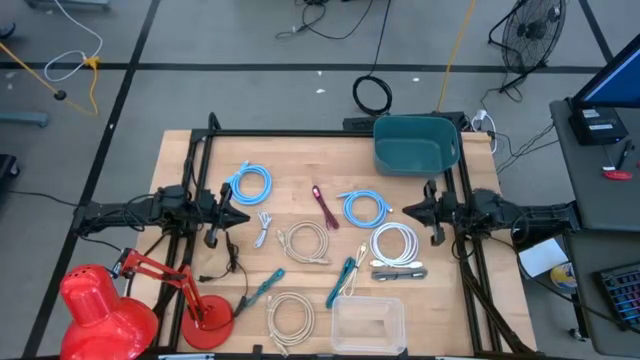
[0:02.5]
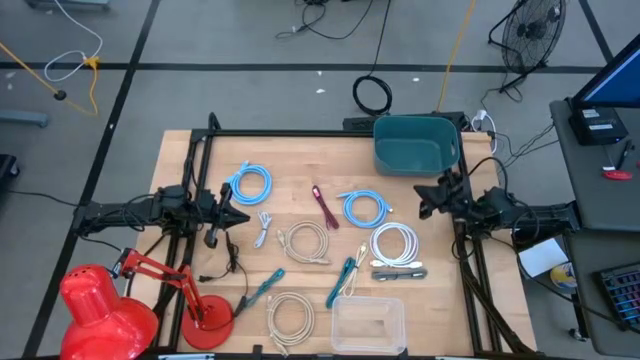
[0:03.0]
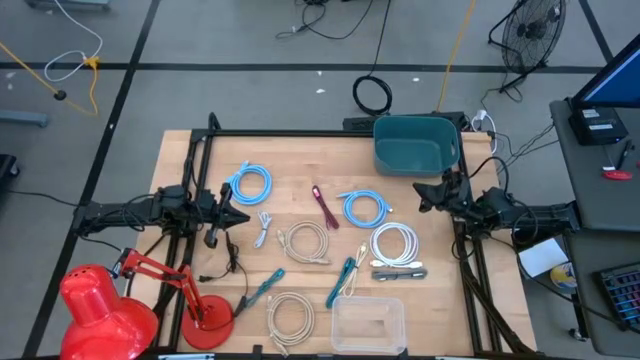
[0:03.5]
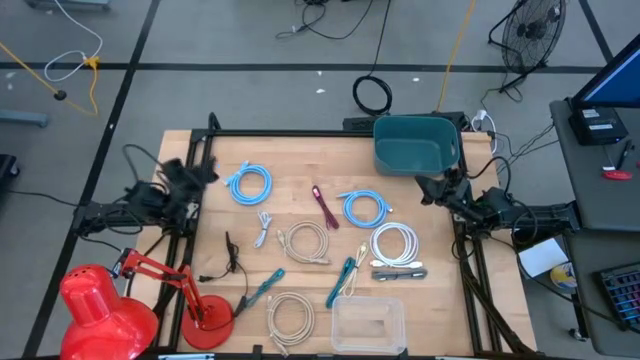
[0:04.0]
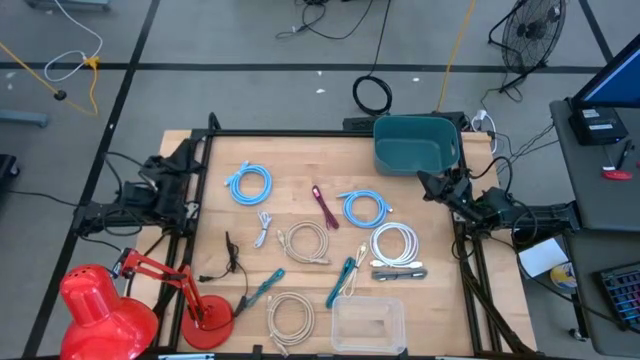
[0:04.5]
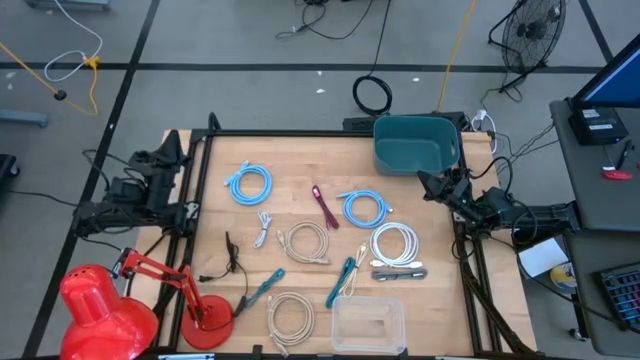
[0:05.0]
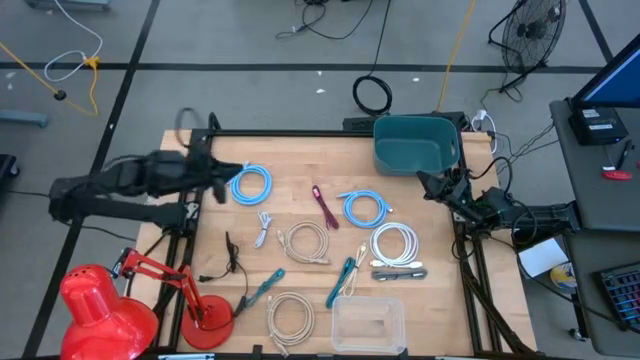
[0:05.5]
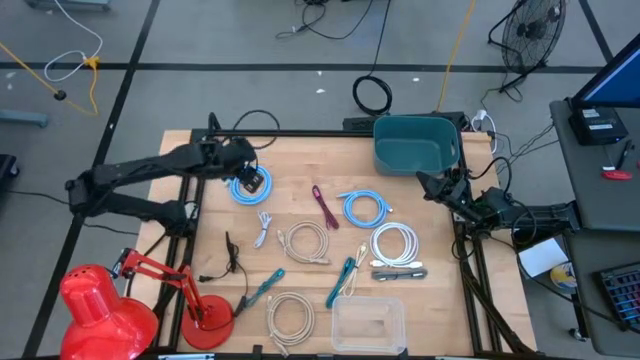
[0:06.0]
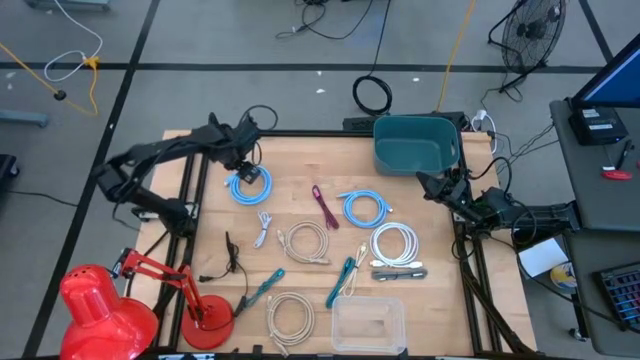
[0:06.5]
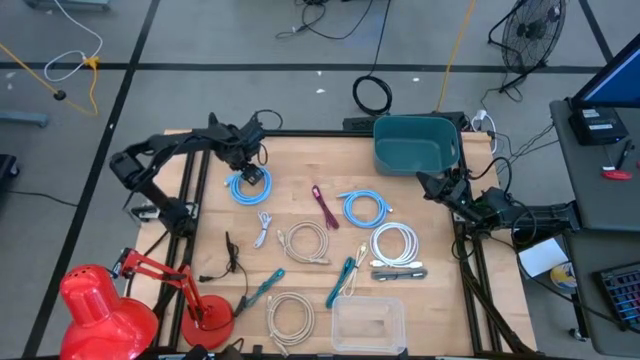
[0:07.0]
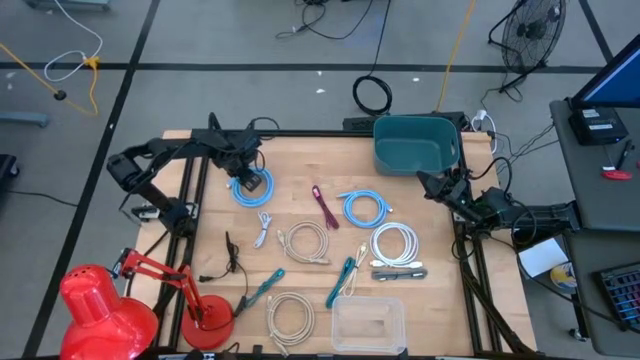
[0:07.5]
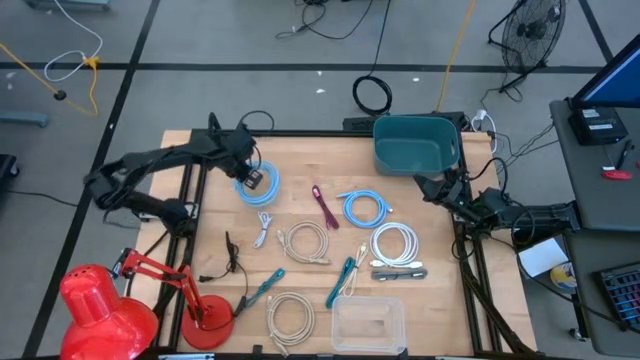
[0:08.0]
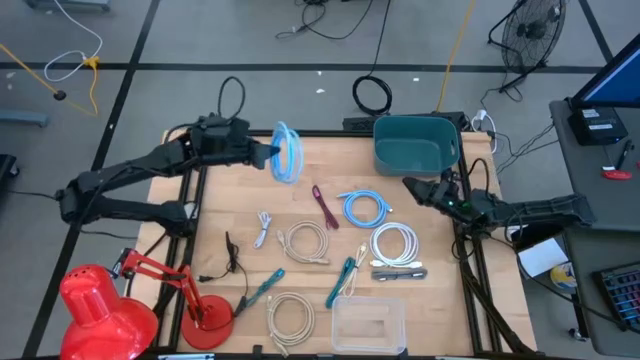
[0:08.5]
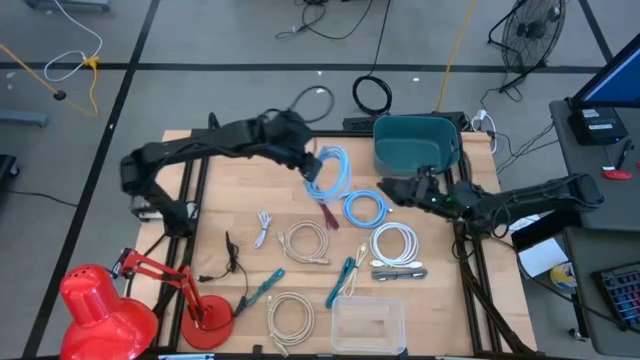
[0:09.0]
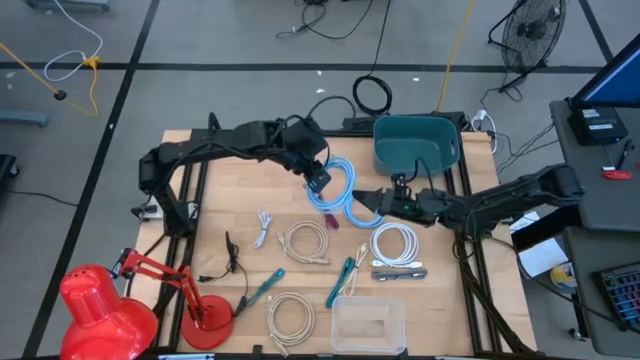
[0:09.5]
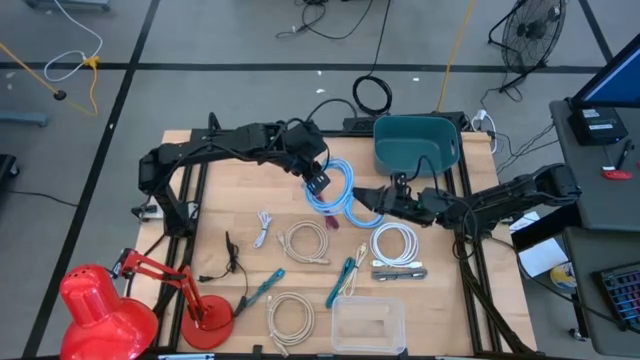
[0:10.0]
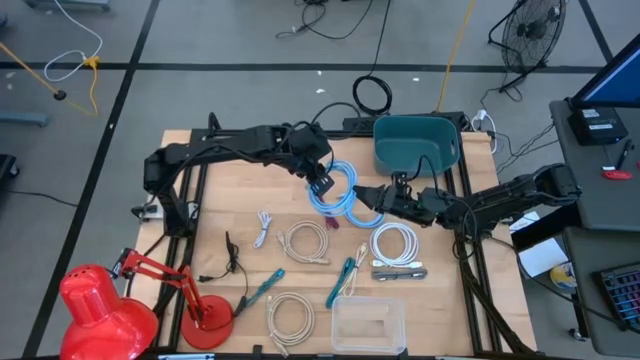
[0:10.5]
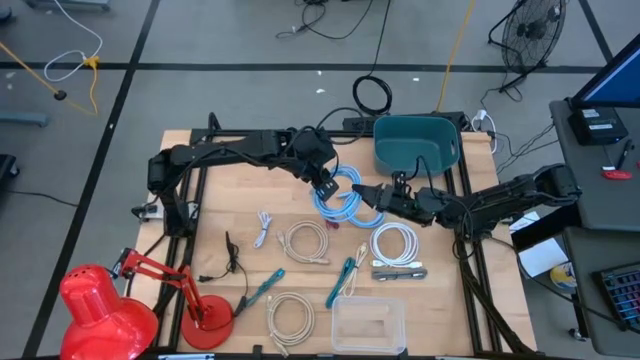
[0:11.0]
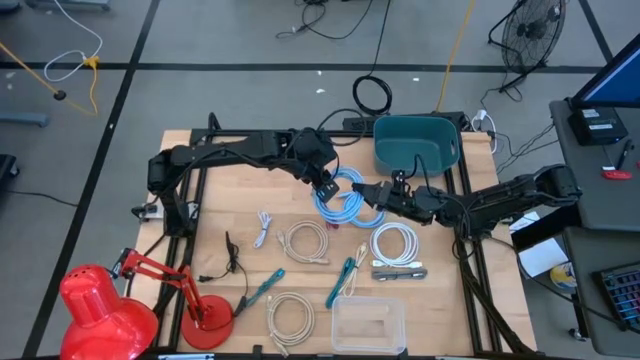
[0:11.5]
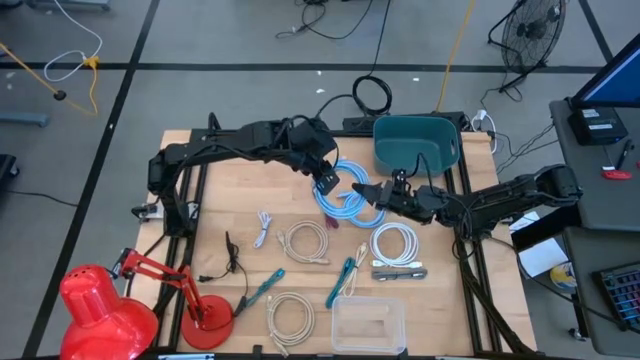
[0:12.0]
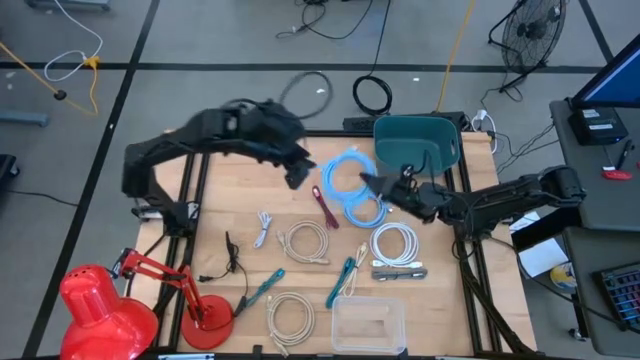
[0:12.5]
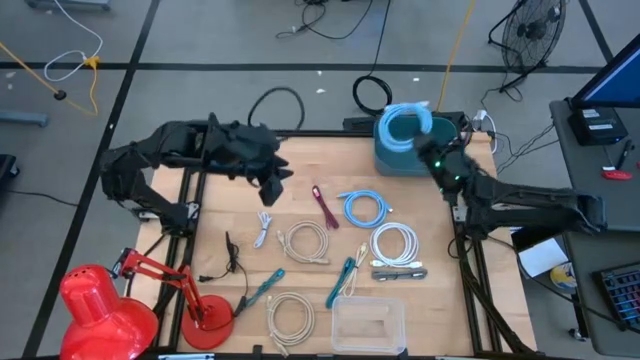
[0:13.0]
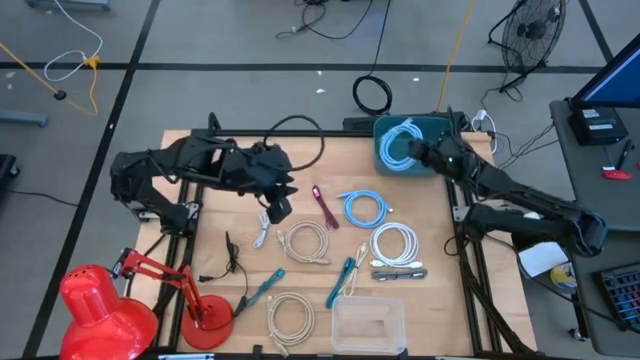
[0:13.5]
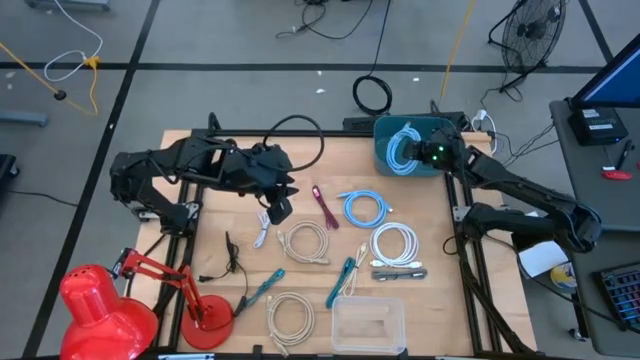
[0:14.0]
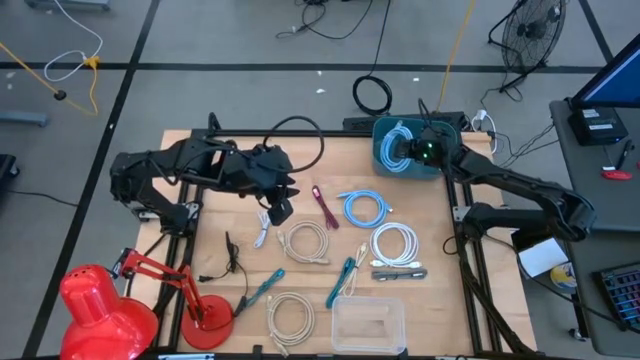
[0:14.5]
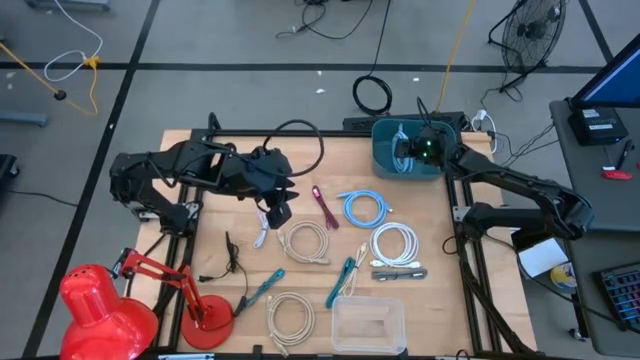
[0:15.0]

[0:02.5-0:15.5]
Task: Pick & Place USB Port
Put the left blue HDMI cable into the blue bin

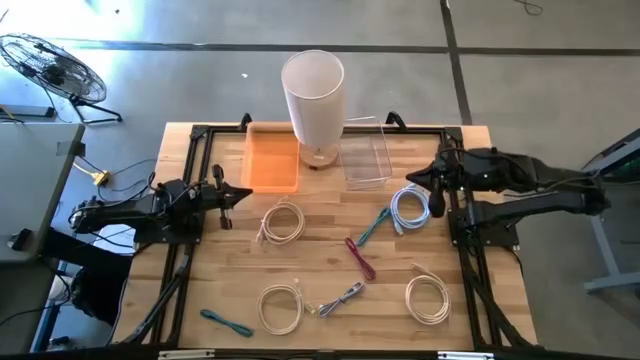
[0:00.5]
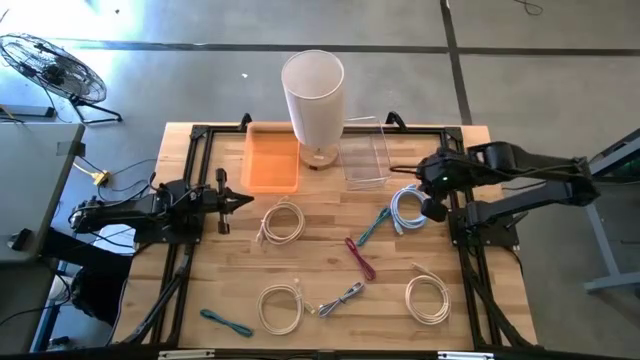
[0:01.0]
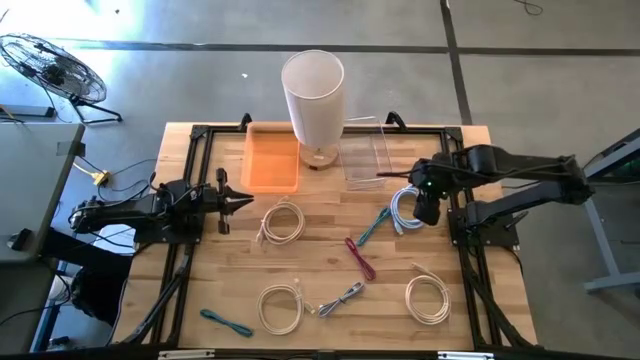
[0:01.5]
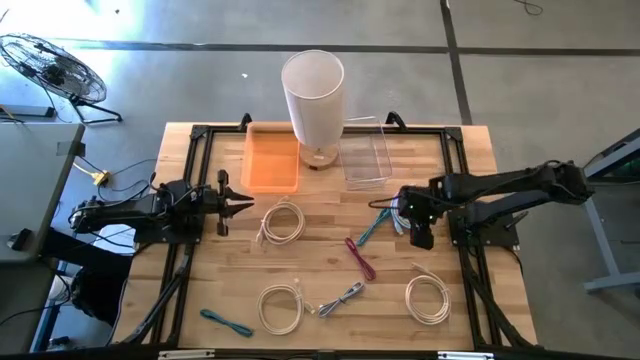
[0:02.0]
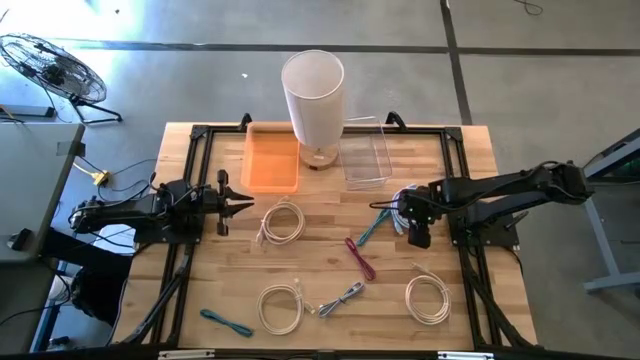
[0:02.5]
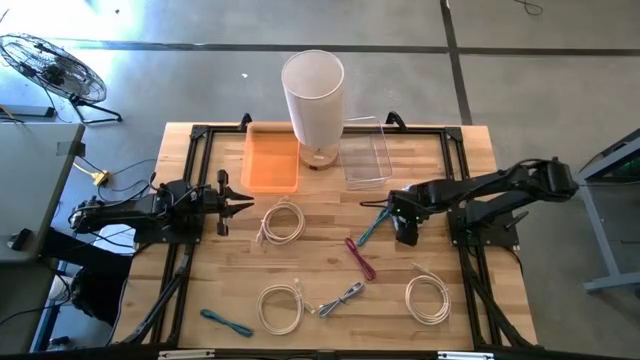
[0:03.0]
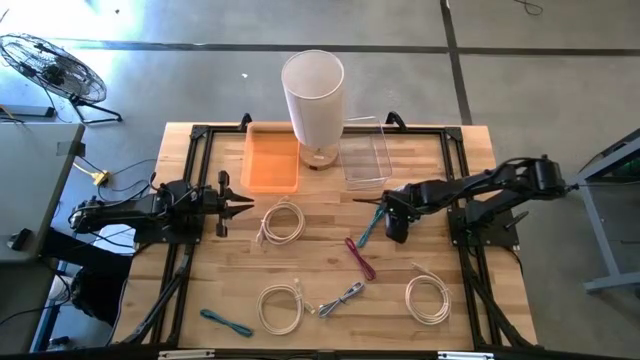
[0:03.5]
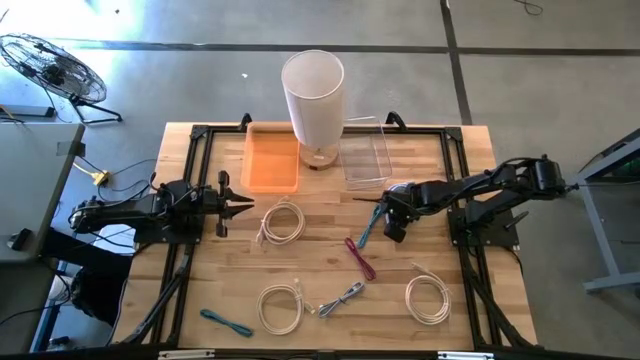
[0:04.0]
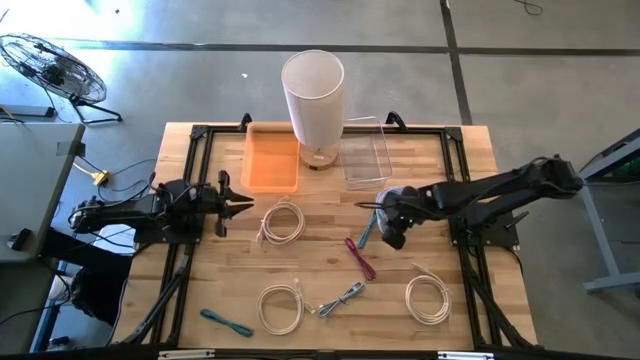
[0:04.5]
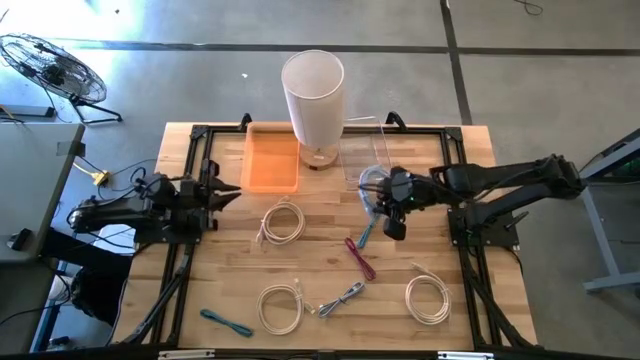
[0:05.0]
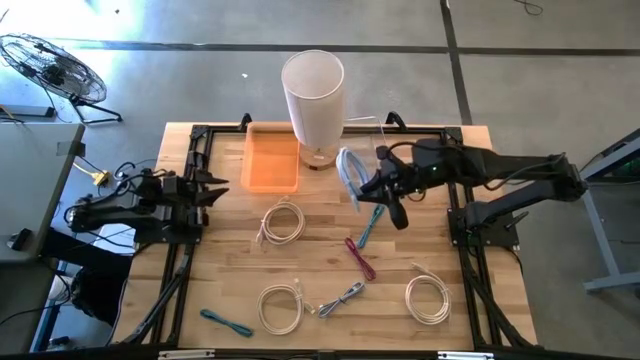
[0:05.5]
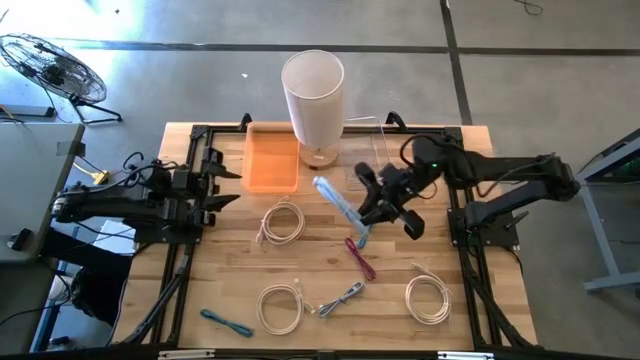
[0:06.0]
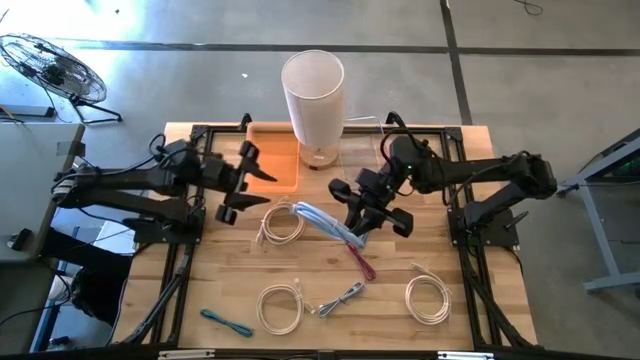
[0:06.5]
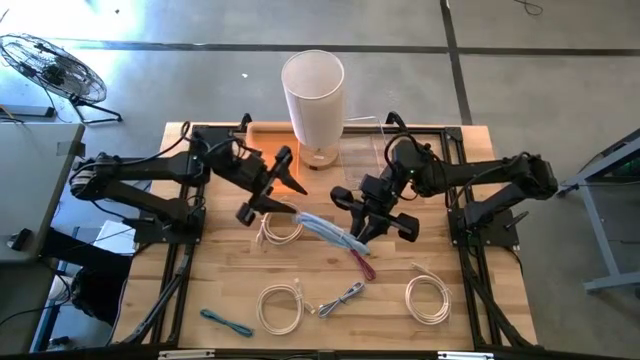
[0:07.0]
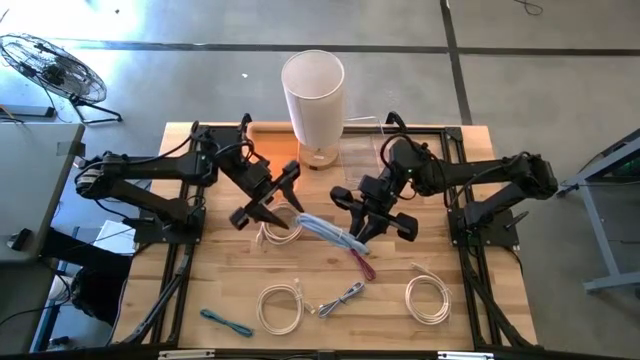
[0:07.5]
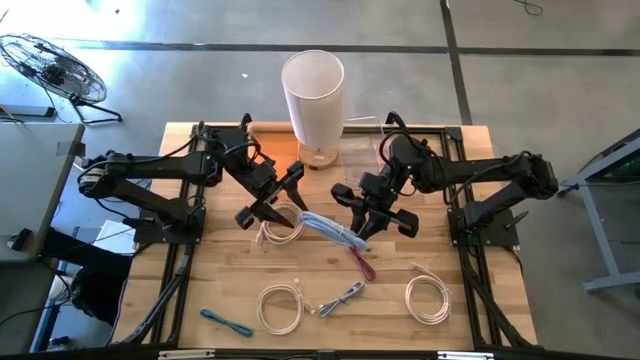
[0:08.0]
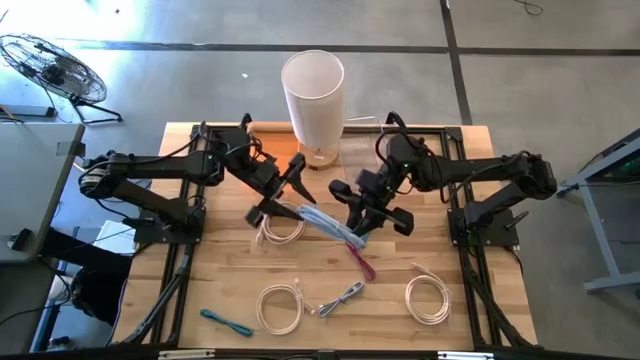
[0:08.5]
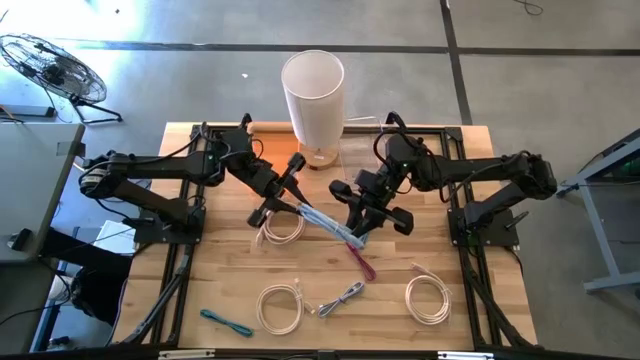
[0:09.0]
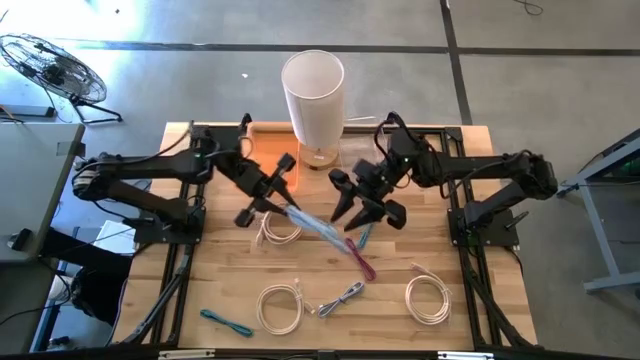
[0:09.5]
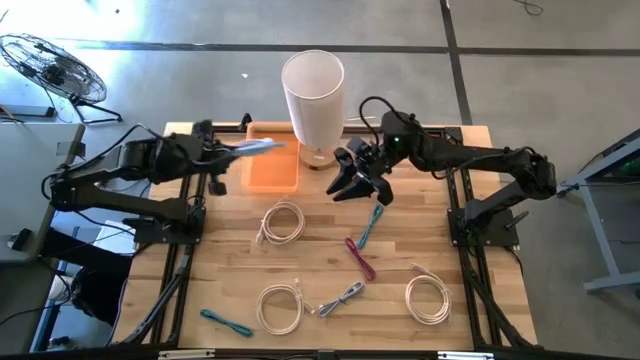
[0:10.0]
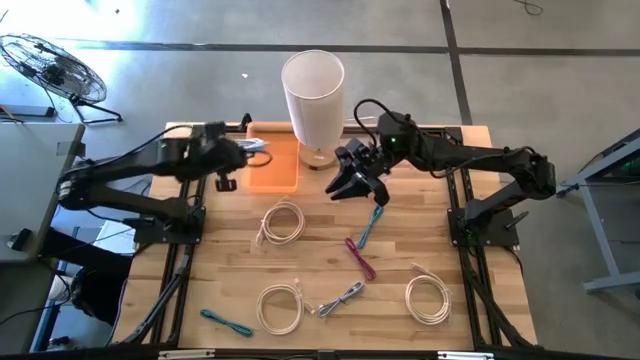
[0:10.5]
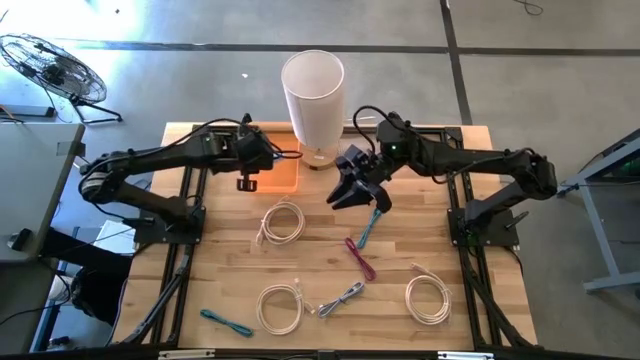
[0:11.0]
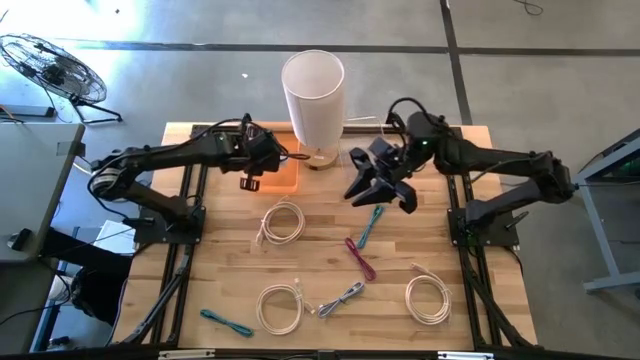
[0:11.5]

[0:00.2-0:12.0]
Task: Pick & Place USB Port
Put the blue HDMI cable into the orange bin
